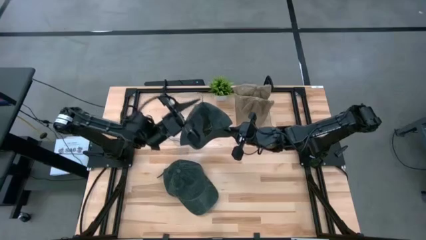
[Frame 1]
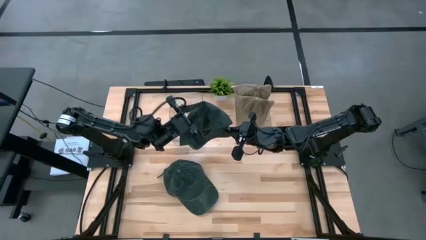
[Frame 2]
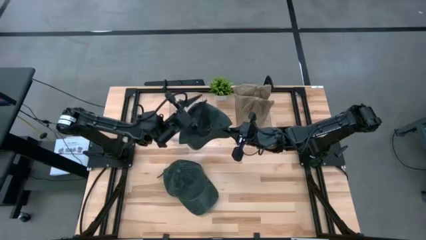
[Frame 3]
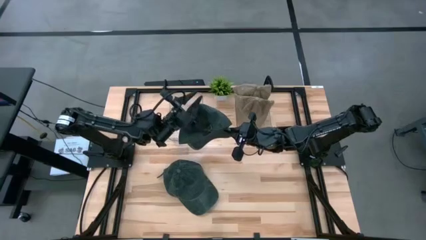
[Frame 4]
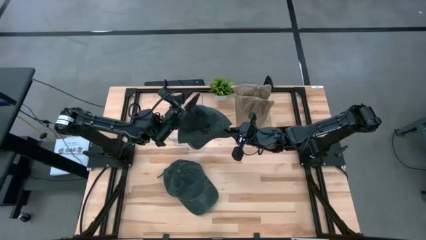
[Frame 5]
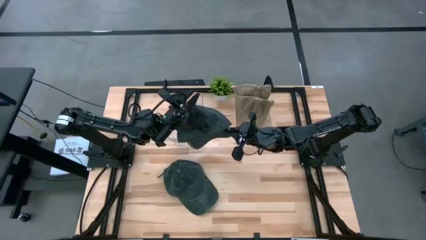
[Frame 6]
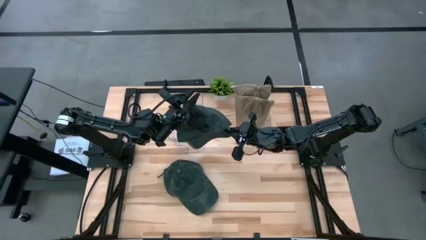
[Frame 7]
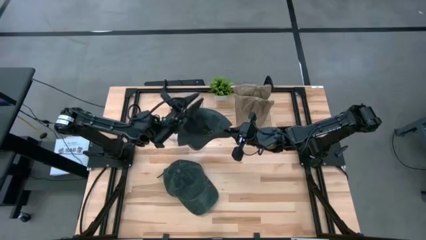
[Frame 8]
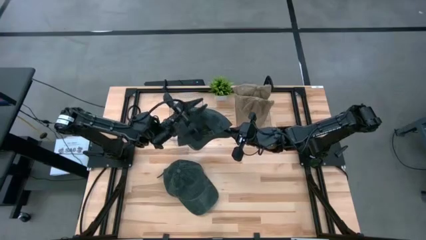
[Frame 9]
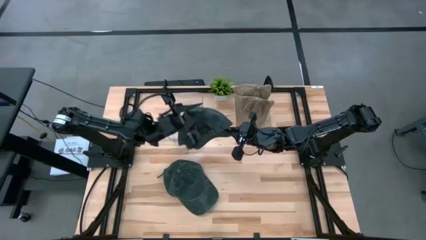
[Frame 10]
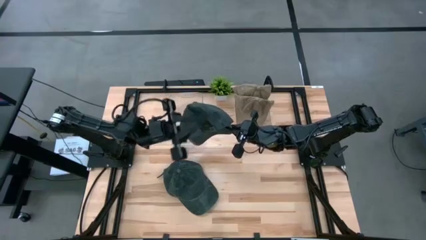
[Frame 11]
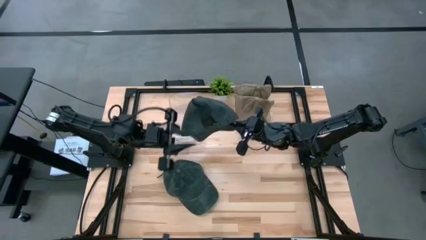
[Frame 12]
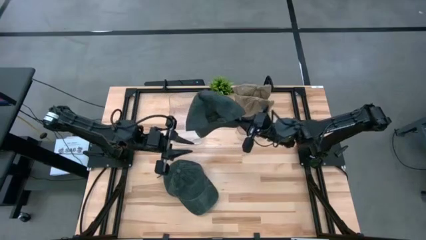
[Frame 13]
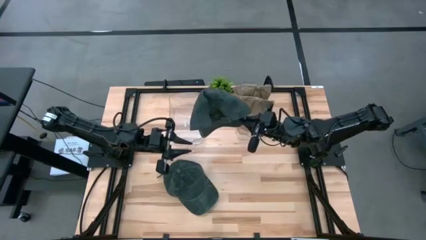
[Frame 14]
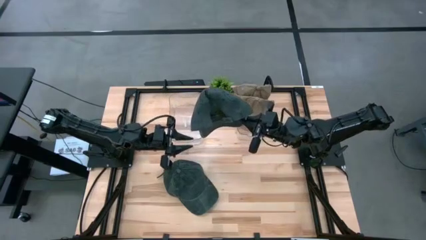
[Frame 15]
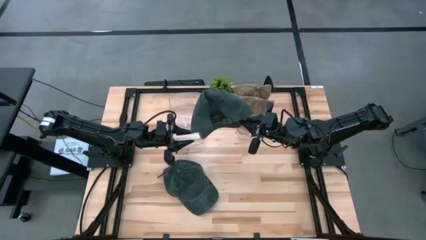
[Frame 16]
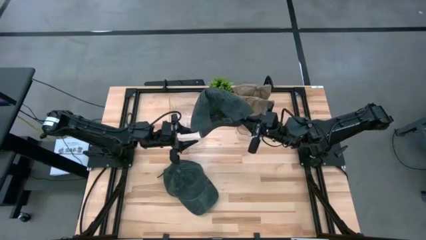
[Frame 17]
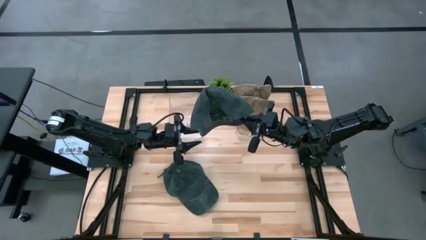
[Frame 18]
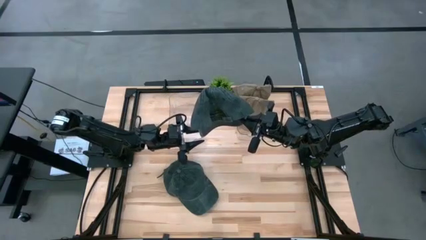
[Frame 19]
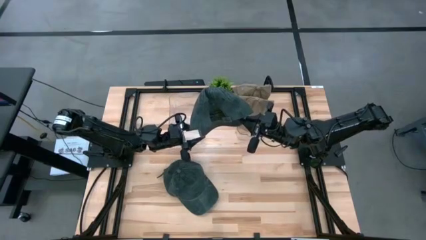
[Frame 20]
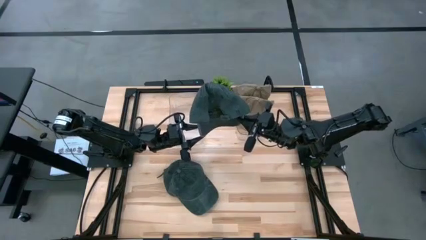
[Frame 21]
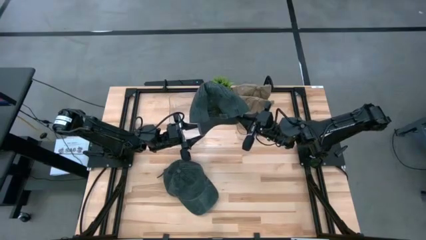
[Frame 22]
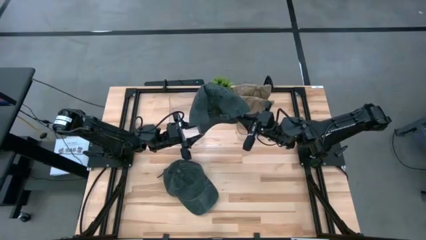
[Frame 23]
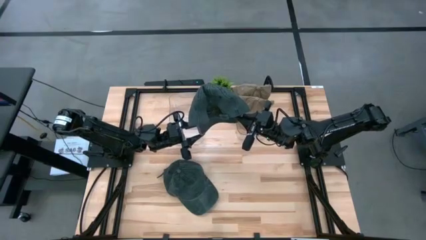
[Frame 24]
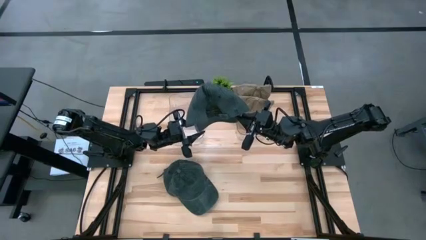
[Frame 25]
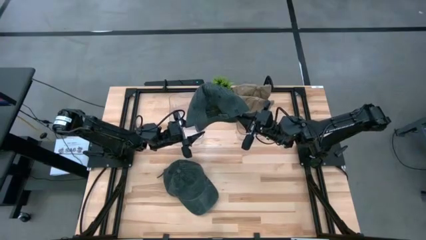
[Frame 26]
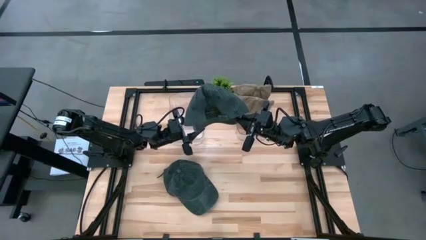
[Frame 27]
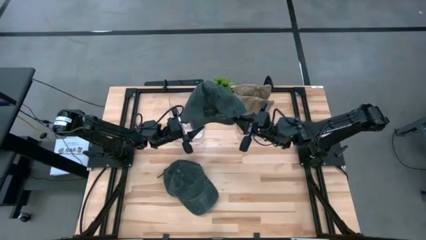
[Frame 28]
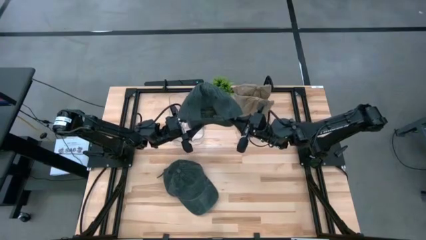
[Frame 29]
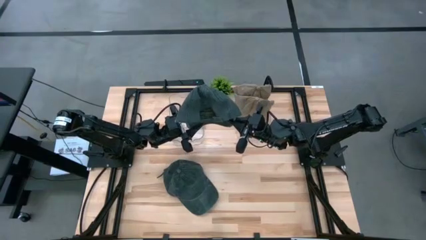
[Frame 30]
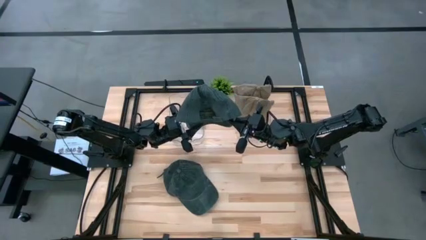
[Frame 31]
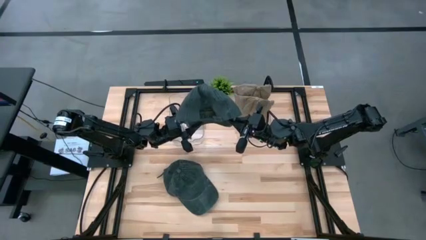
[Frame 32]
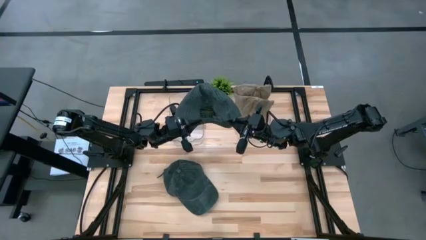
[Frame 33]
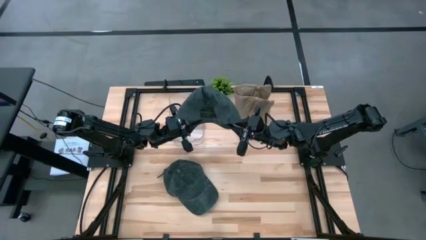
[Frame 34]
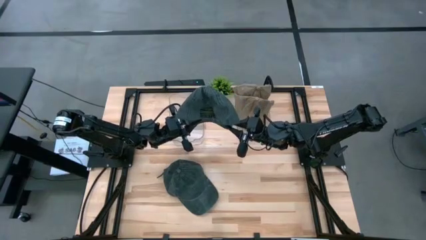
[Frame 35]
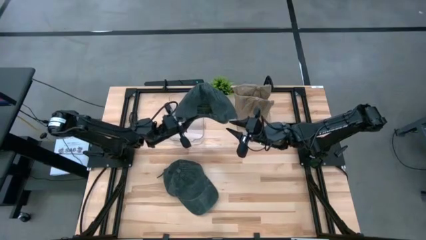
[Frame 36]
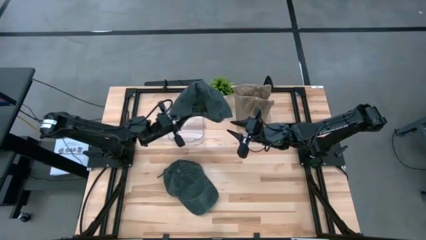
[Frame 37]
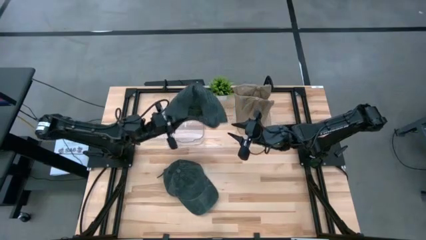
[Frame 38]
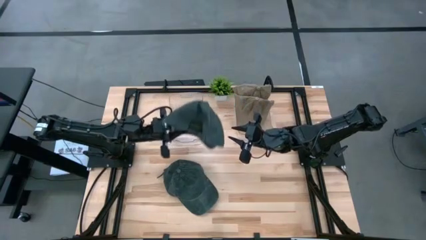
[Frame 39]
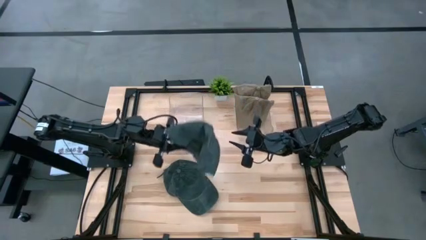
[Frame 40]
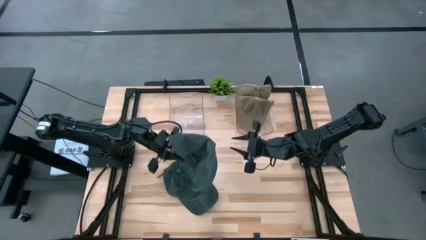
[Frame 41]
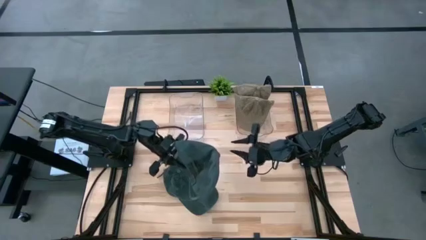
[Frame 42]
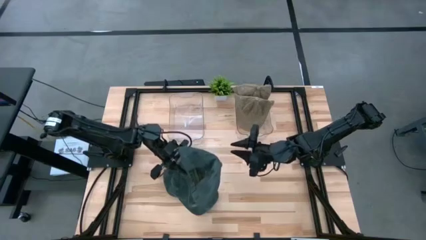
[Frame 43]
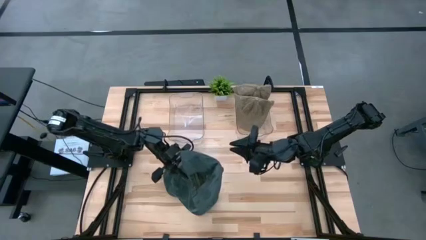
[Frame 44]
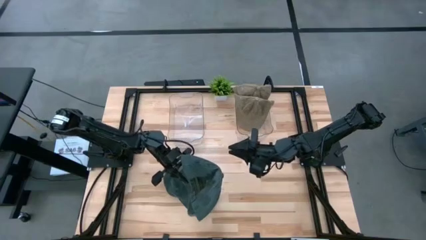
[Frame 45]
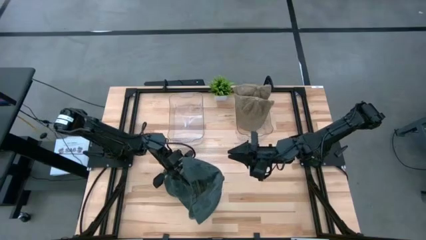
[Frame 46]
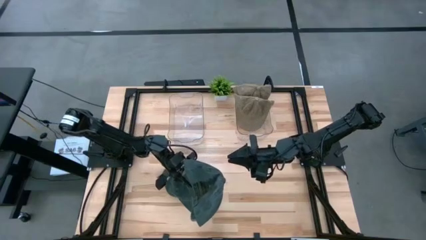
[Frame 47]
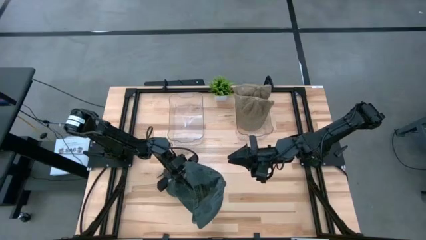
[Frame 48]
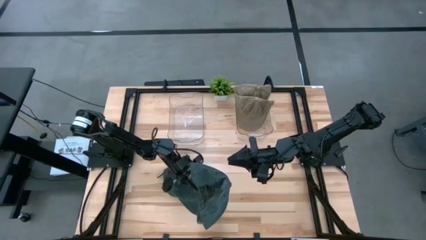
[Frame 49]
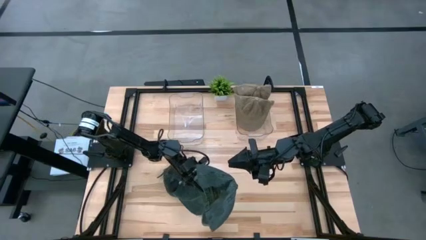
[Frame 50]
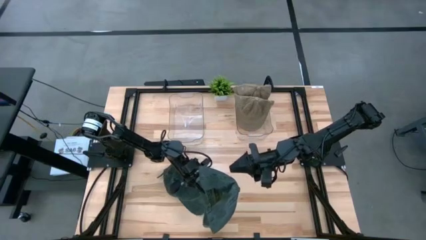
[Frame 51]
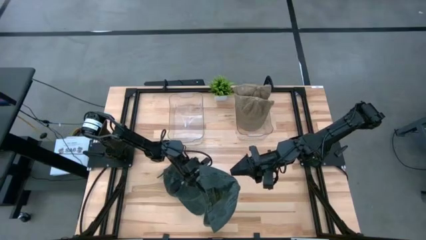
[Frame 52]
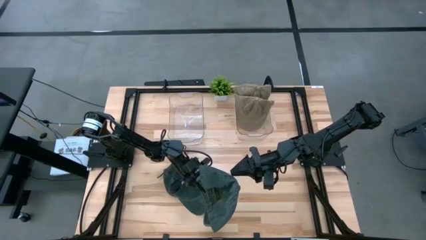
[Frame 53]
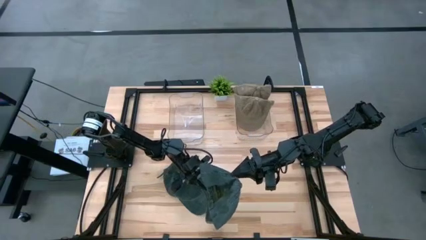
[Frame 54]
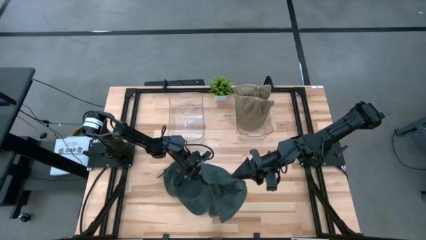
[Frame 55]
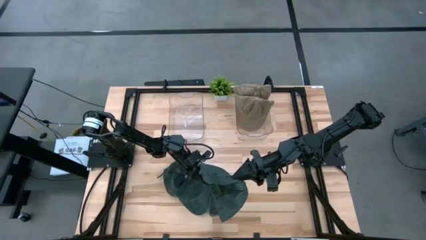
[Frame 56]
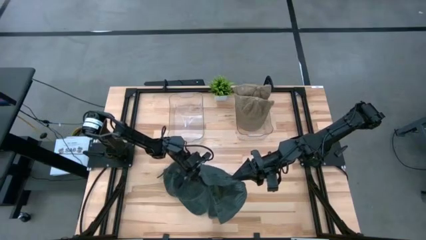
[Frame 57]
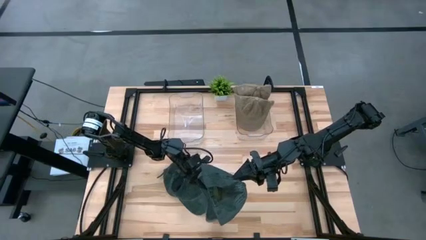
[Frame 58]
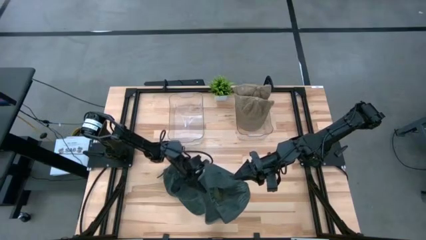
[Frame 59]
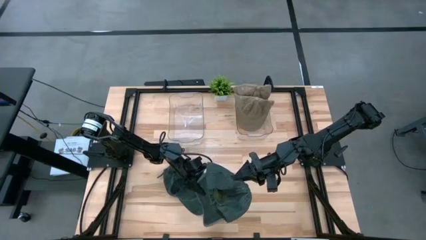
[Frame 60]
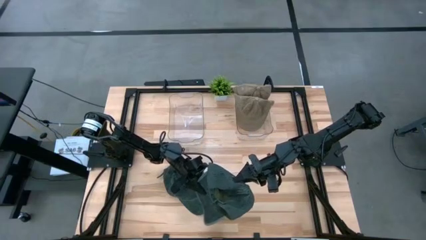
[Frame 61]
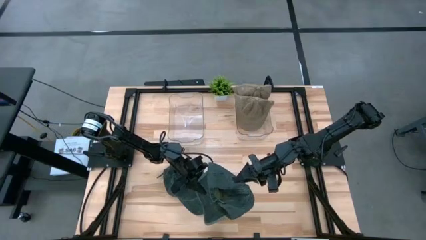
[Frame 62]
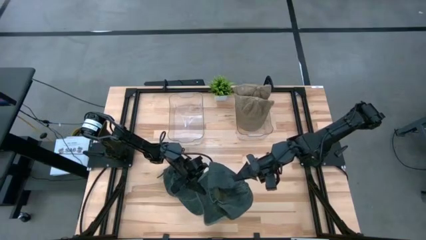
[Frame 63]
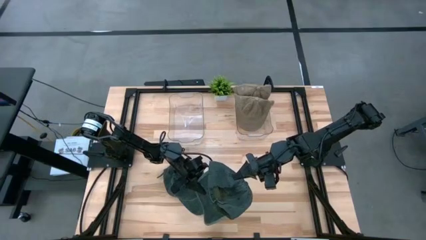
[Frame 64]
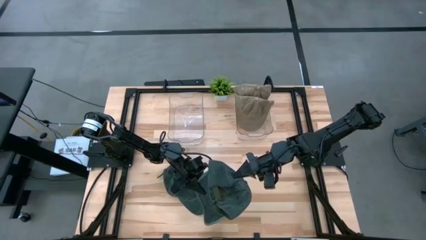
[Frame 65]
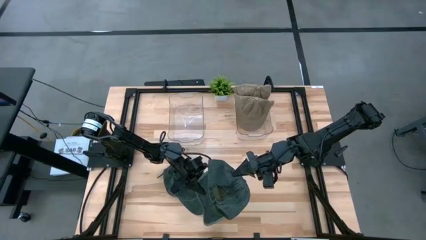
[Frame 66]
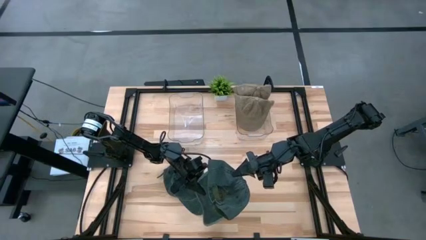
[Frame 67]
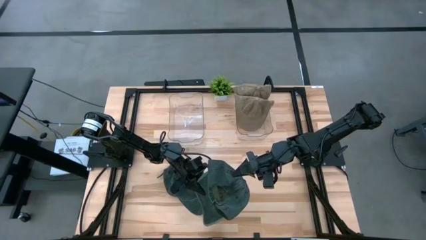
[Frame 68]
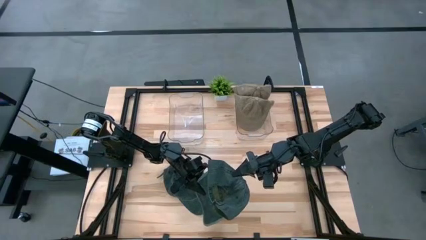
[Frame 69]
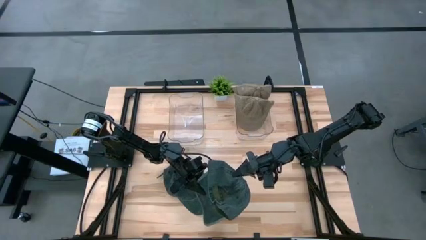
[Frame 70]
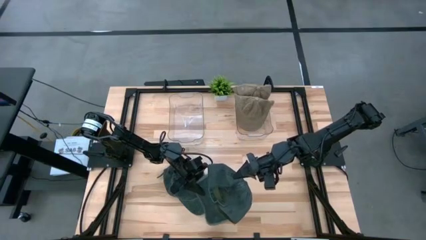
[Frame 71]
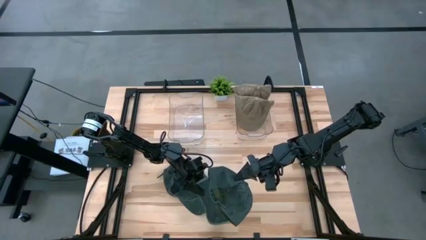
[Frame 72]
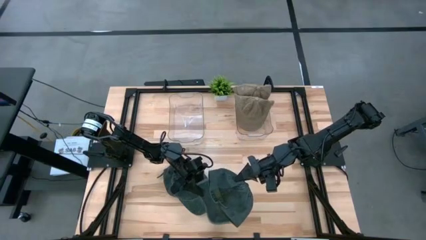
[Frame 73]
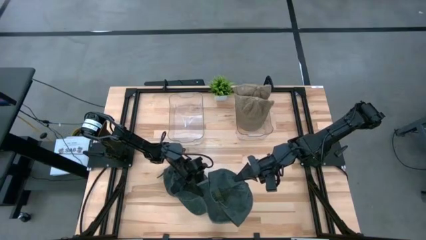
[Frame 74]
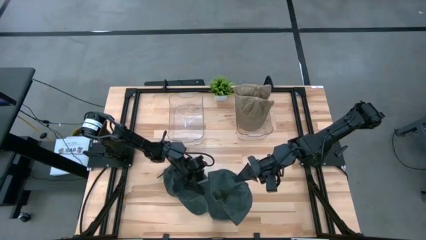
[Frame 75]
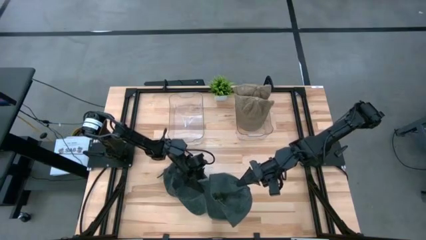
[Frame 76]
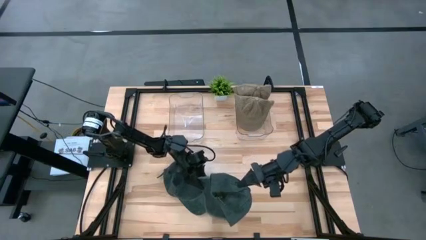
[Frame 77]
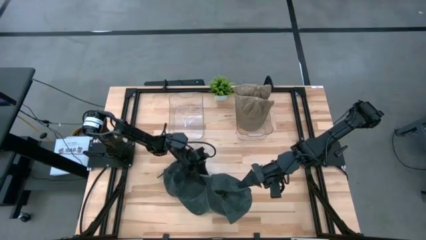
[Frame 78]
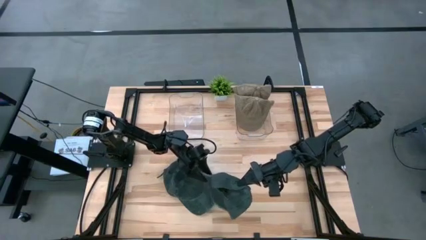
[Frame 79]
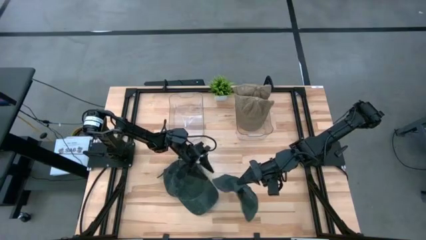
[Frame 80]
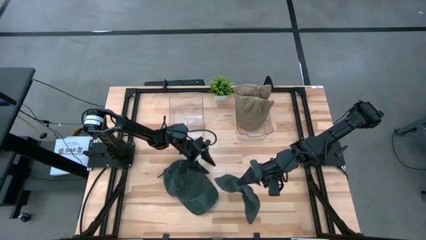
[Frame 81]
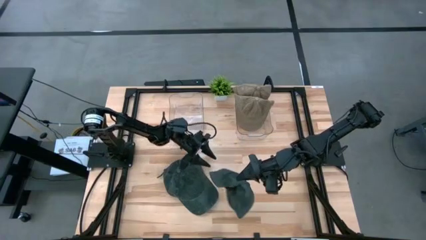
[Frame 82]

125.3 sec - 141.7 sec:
Task: Pick & Place hat
Put the right black cap into the left transparent container
